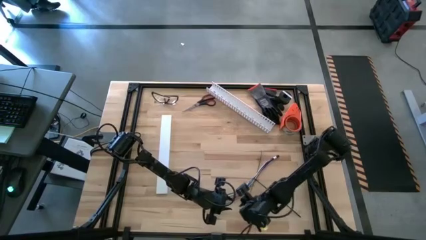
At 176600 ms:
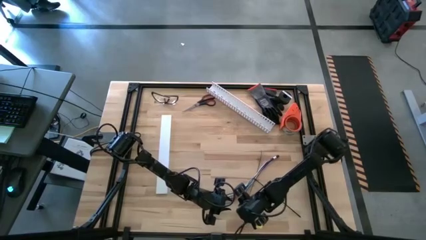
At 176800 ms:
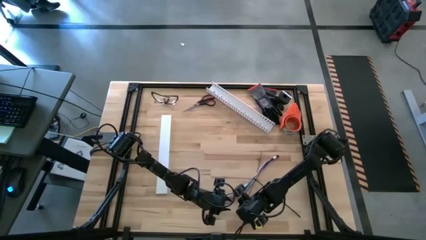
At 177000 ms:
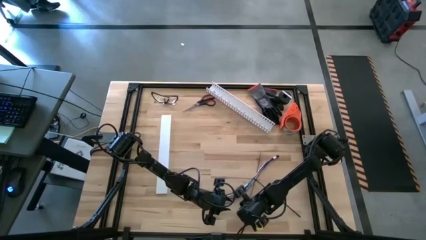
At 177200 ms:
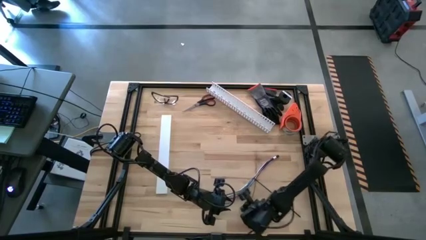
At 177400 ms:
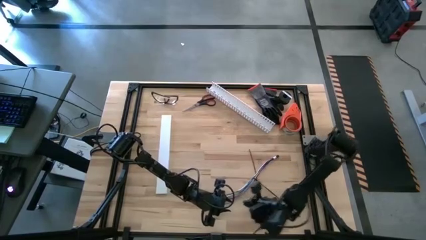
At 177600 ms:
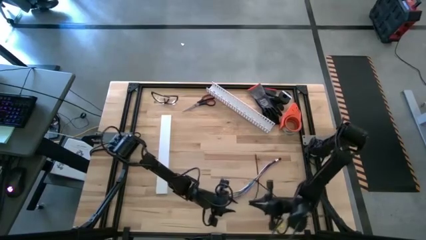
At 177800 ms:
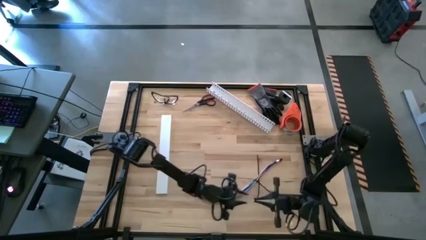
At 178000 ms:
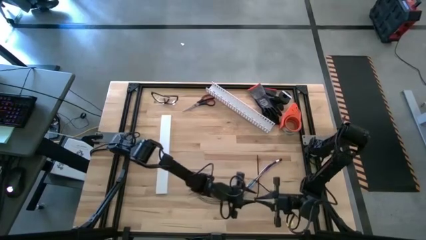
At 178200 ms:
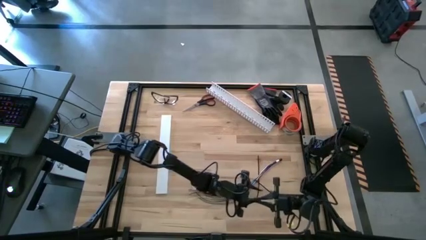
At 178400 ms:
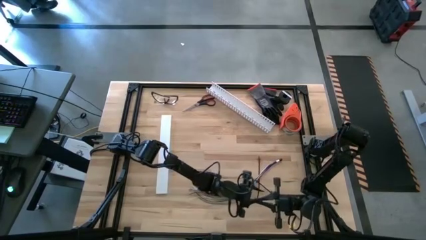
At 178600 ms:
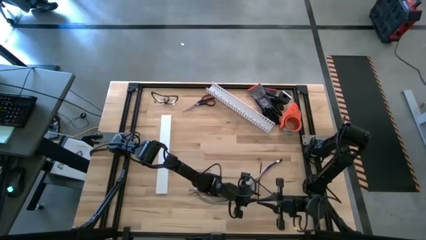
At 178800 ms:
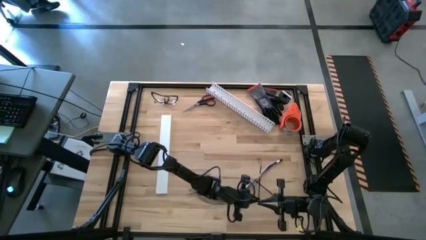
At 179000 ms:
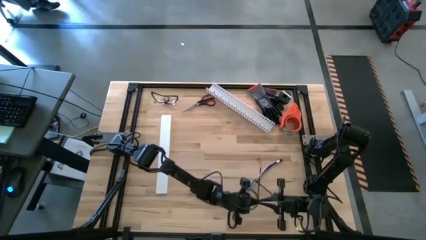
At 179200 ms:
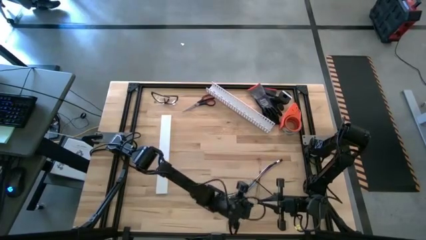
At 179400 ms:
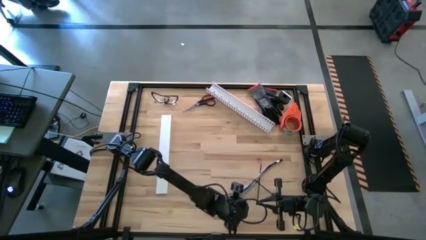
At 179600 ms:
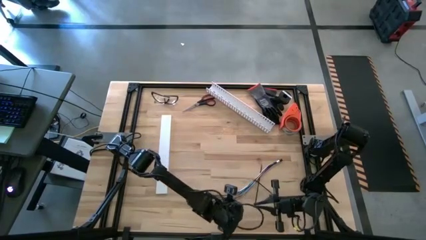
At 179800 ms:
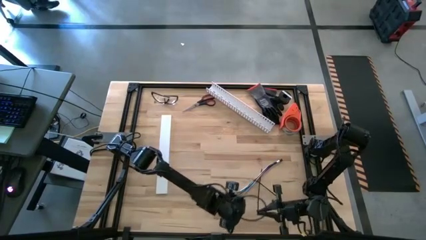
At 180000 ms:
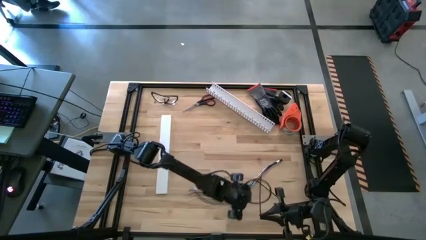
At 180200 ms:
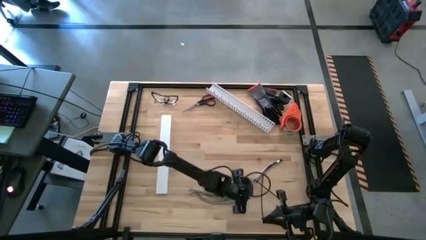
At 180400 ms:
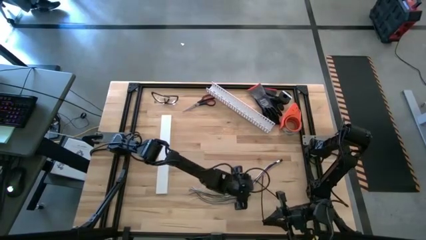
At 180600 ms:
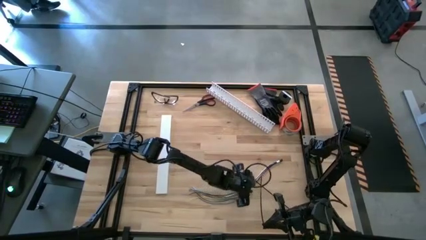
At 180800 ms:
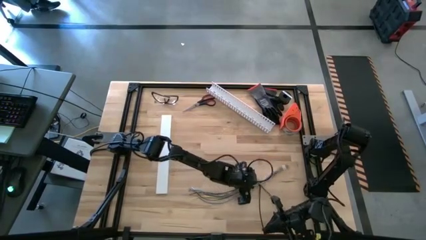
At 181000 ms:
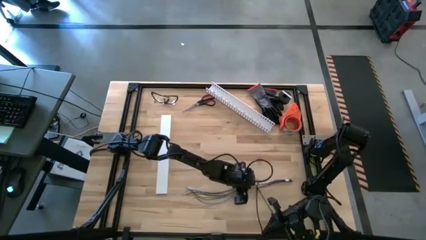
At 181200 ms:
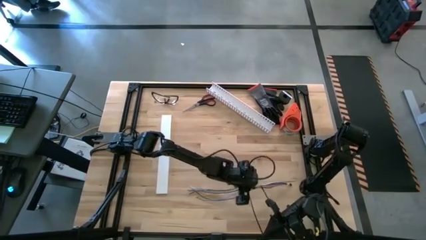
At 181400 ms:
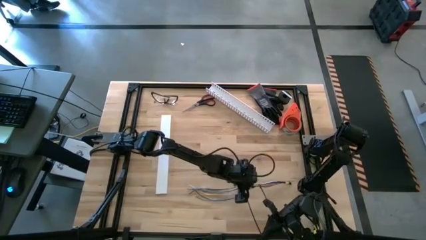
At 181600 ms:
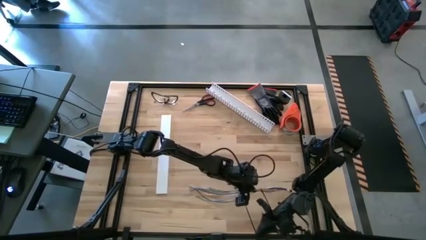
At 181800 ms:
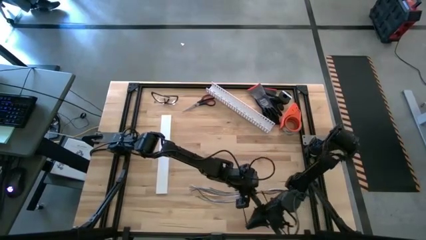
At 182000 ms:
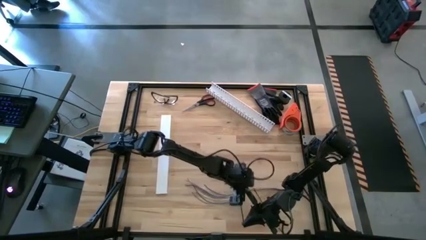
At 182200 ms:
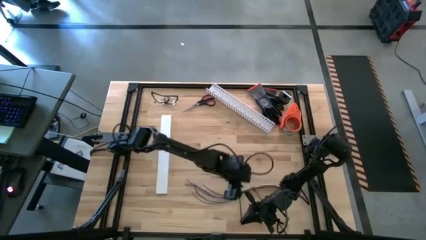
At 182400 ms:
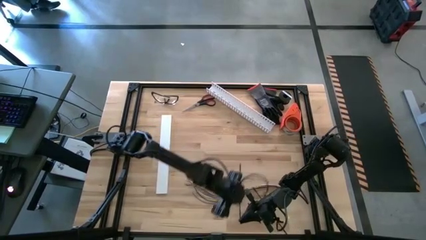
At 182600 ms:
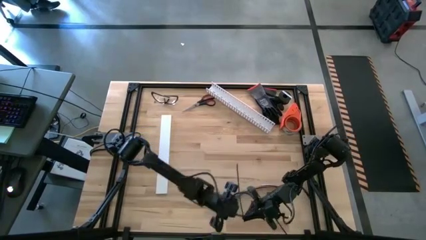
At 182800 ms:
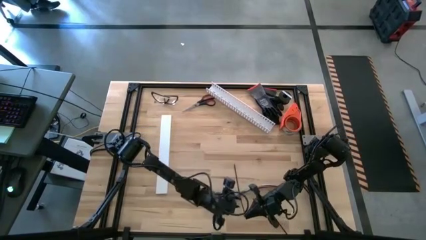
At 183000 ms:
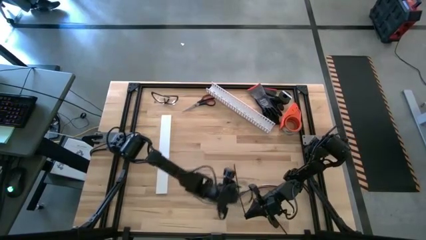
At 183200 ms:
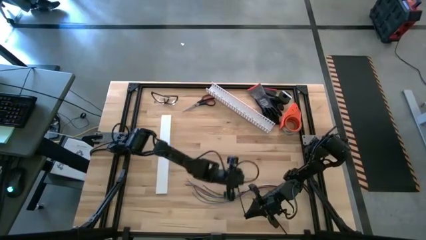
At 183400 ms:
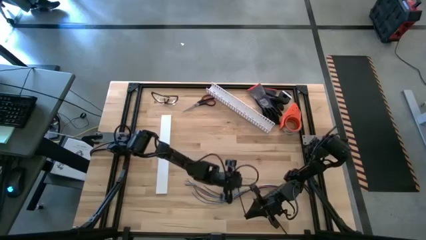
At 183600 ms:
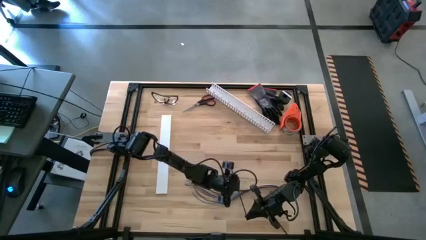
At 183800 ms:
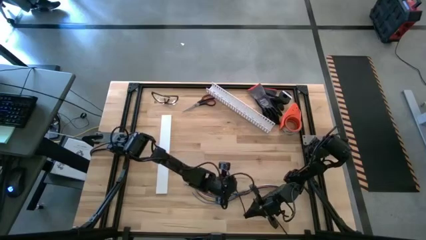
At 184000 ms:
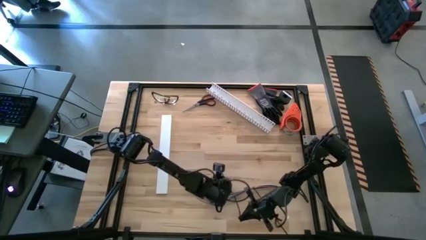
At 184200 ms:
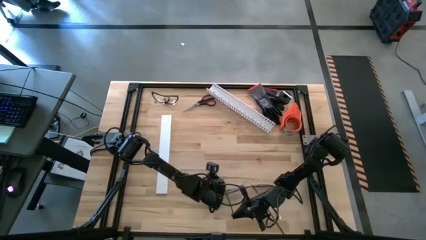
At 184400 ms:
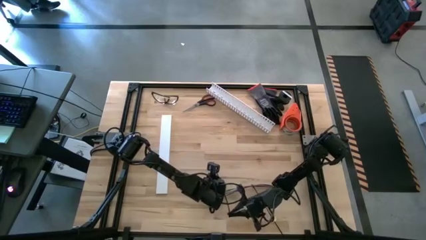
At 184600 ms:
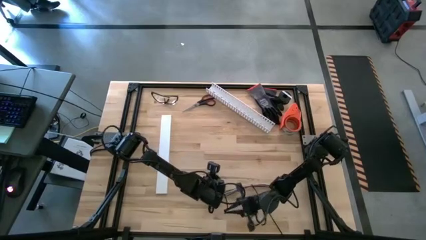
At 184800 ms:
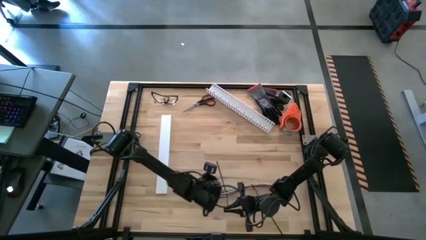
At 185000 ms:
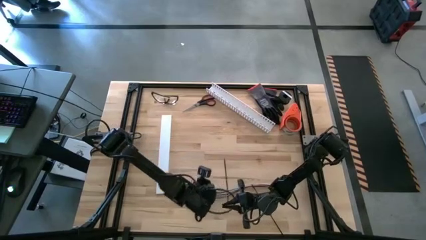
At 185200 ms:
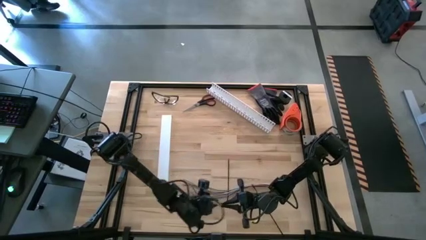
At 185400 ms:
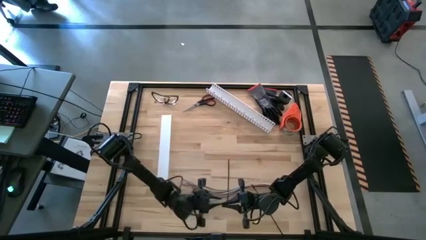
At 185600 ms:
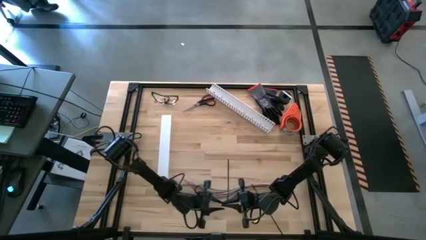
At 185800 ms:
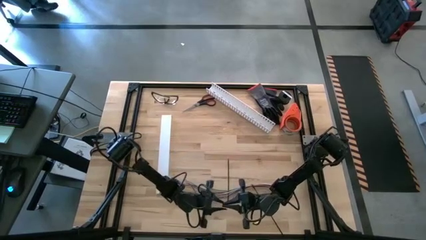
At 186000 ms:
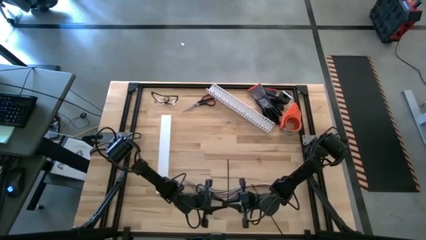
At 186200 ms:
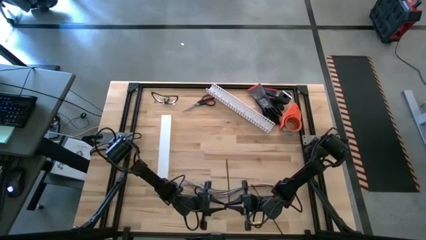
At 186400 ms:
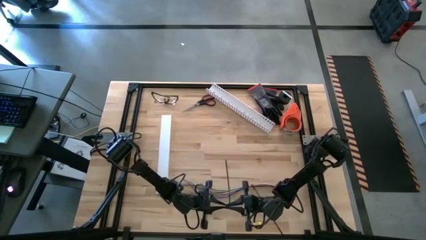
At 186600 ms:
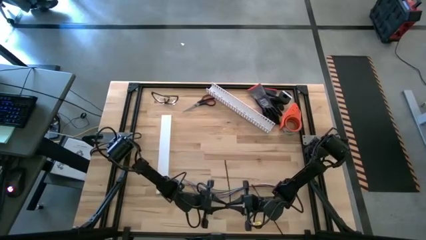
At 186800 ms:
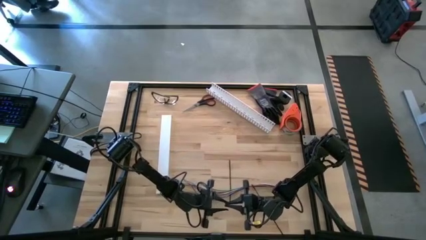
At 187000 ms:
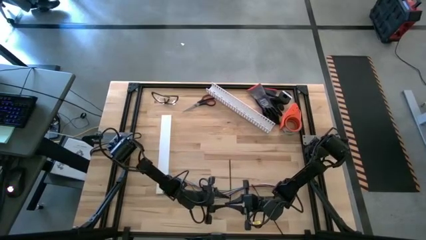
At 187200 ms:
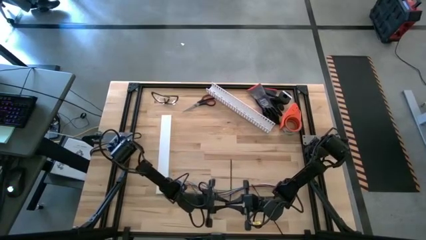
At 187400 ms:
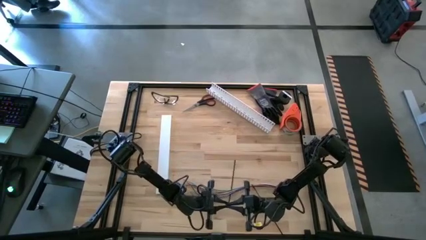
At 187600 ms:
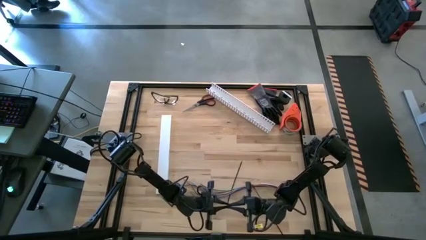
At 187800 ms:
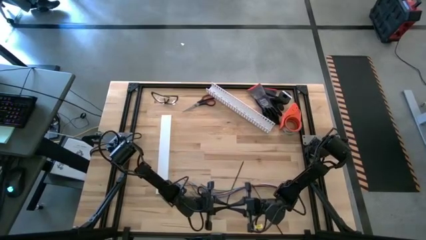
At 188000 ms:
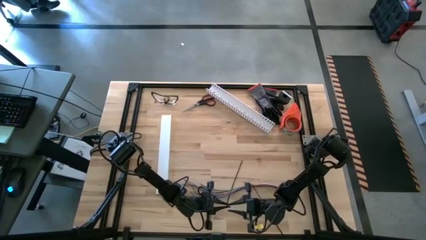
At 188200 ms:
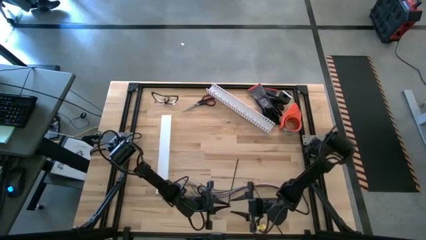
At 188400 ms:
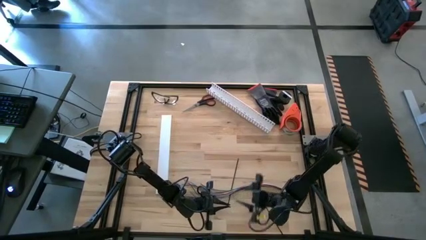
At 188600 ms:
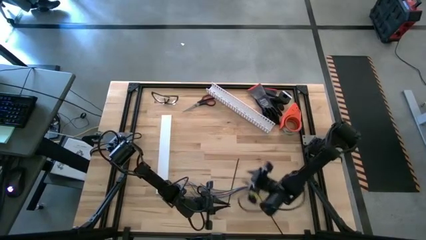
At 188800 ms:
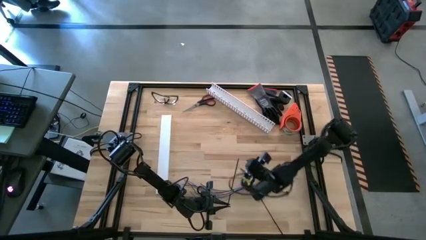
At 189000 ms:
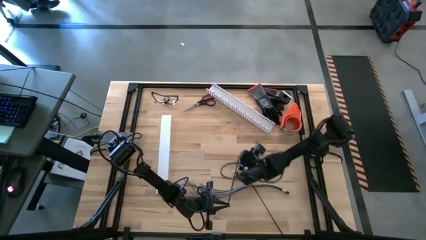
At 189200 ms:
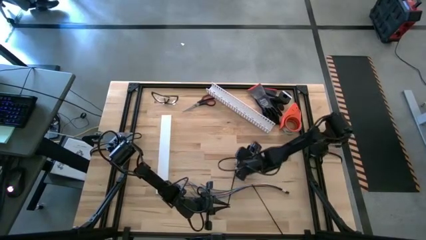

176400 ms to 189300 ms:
Task: Ziptie cables
Wrap the black zip tie on the cable wires
